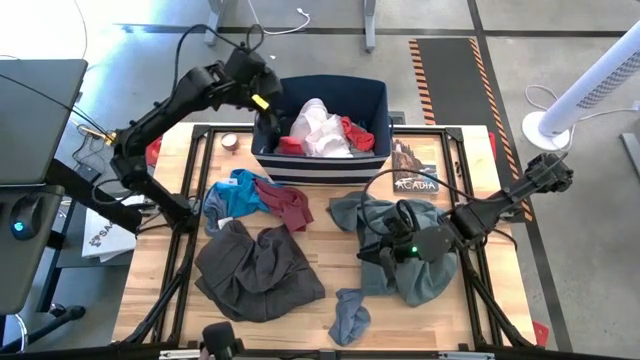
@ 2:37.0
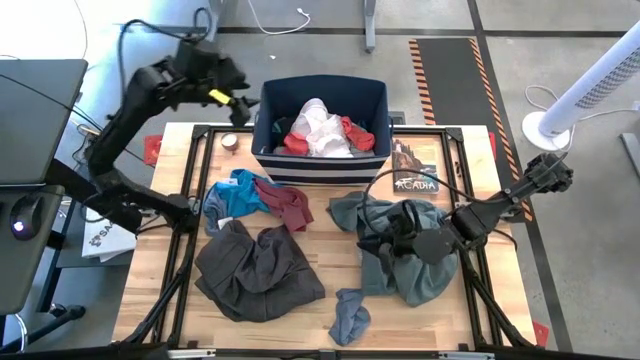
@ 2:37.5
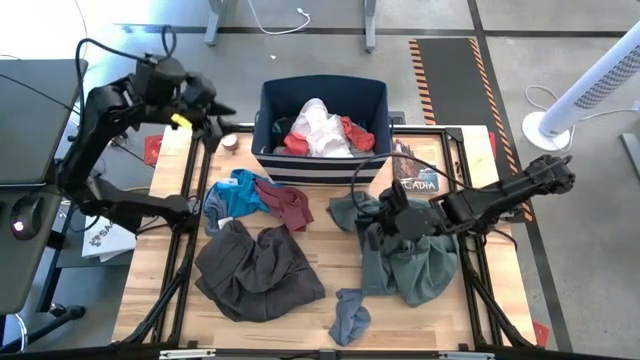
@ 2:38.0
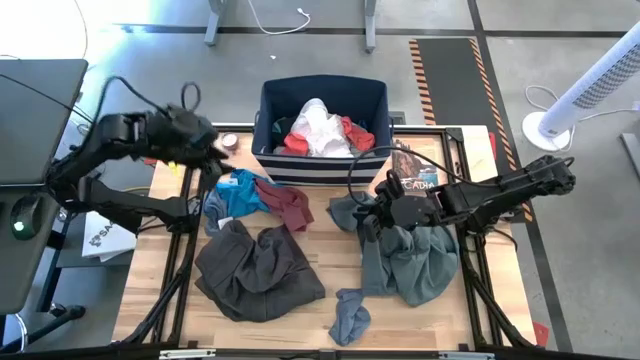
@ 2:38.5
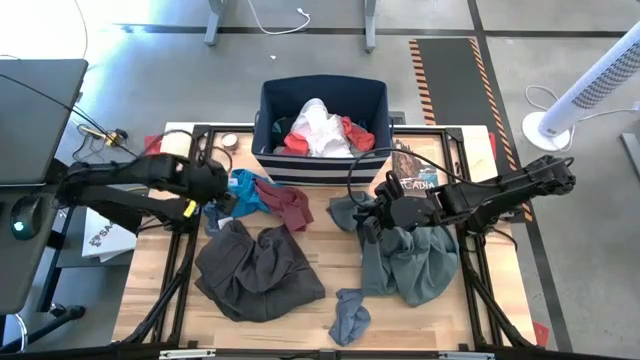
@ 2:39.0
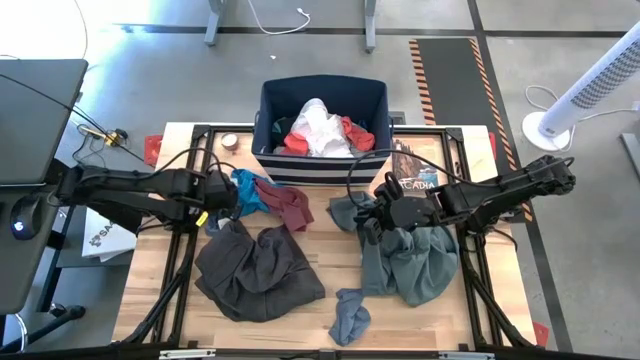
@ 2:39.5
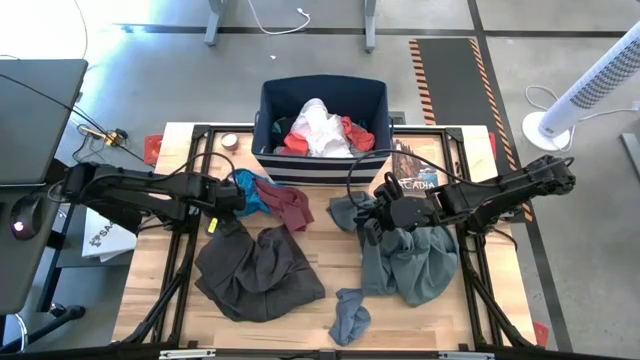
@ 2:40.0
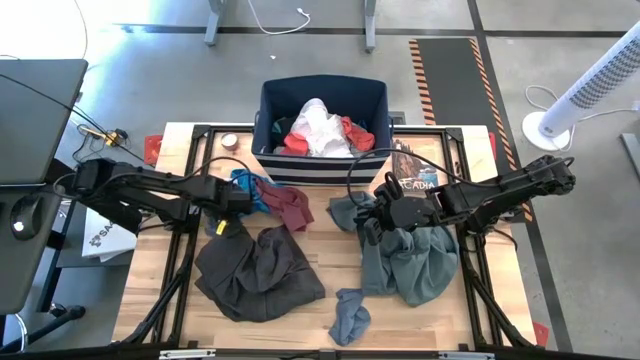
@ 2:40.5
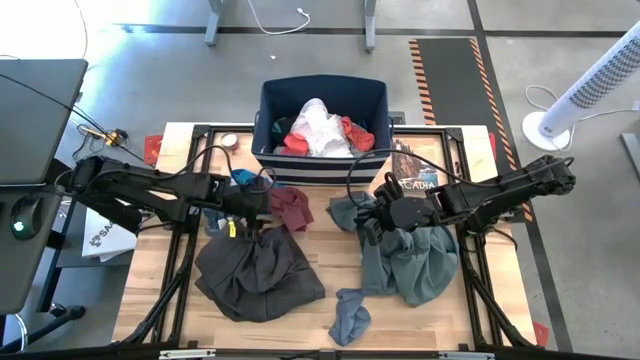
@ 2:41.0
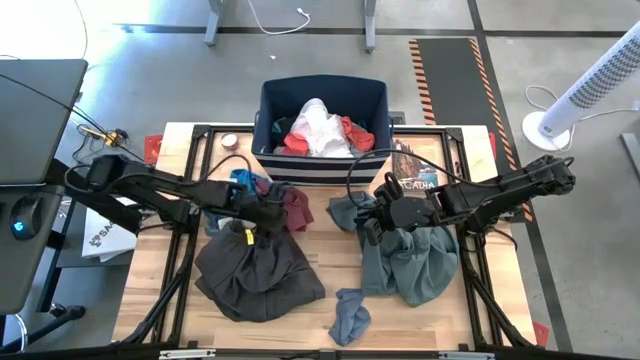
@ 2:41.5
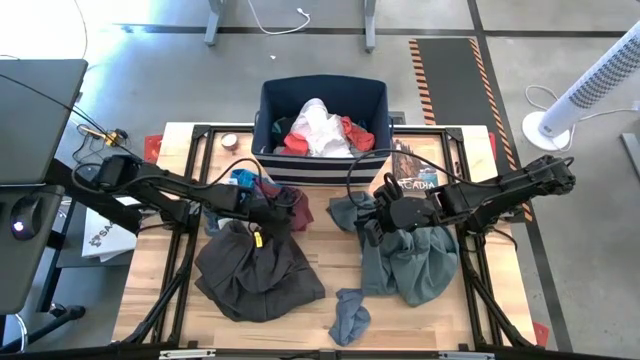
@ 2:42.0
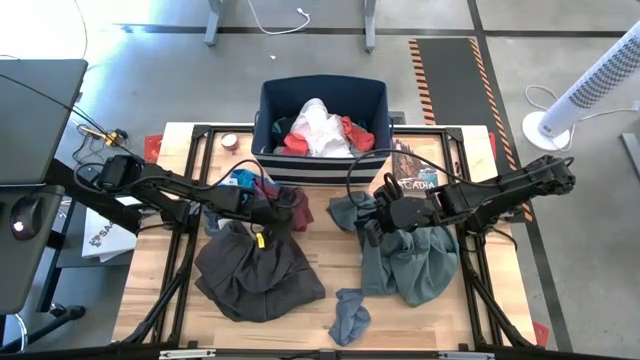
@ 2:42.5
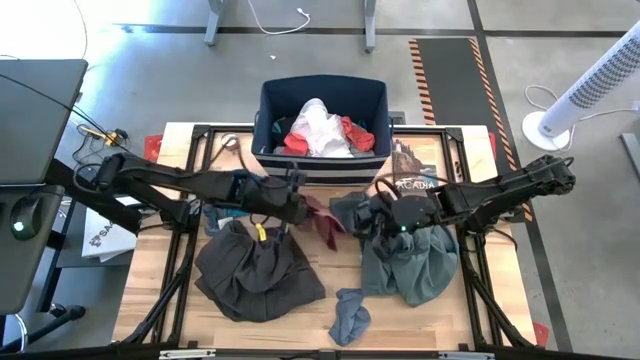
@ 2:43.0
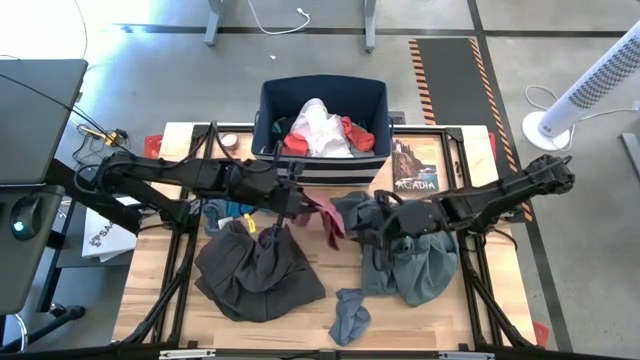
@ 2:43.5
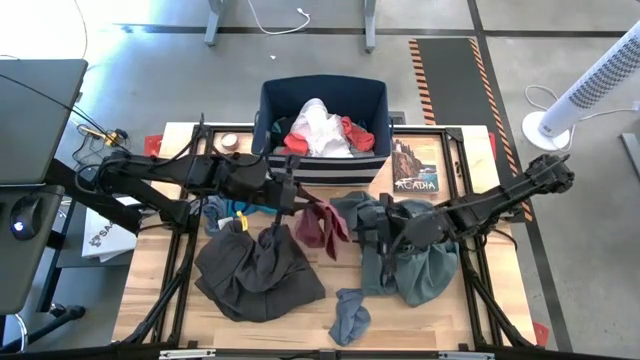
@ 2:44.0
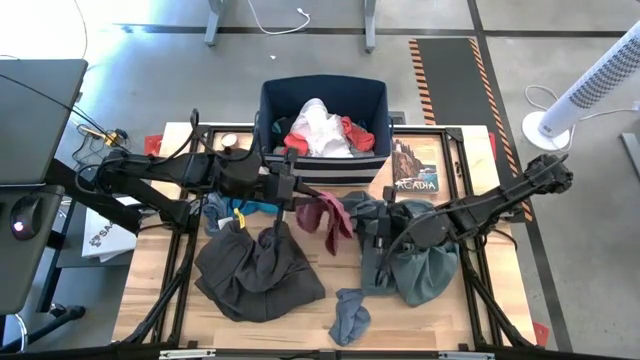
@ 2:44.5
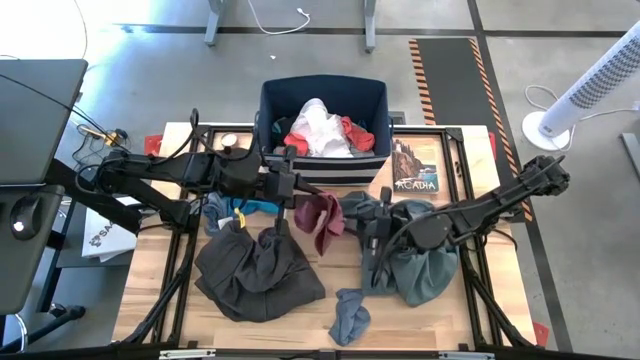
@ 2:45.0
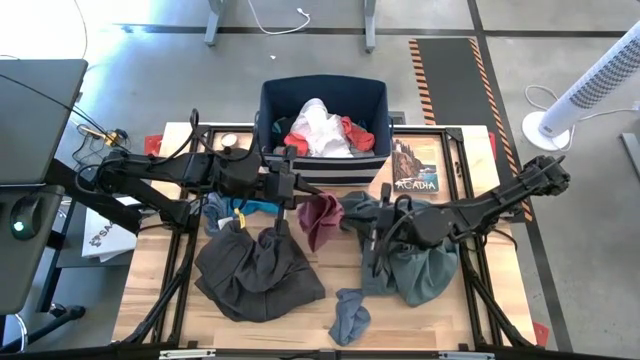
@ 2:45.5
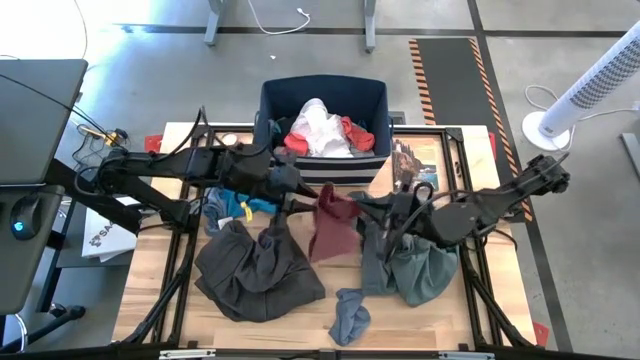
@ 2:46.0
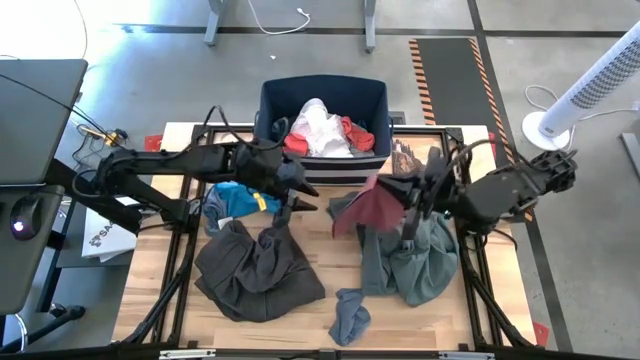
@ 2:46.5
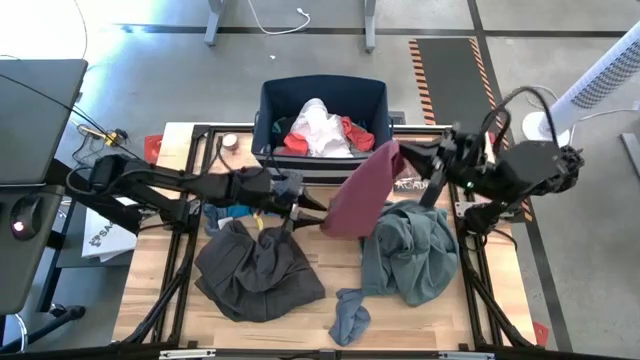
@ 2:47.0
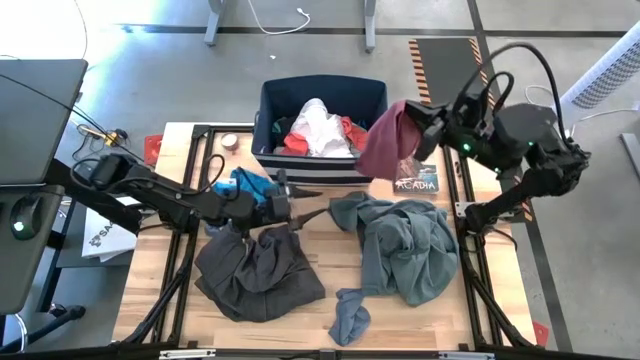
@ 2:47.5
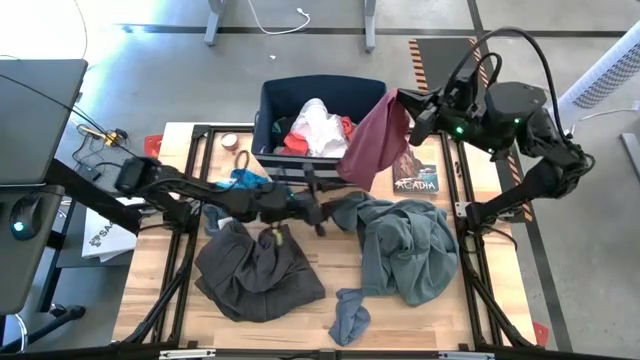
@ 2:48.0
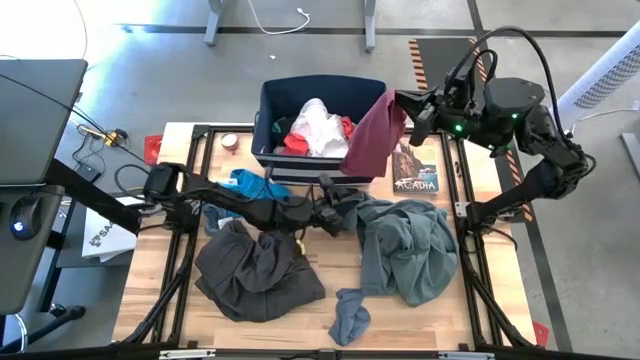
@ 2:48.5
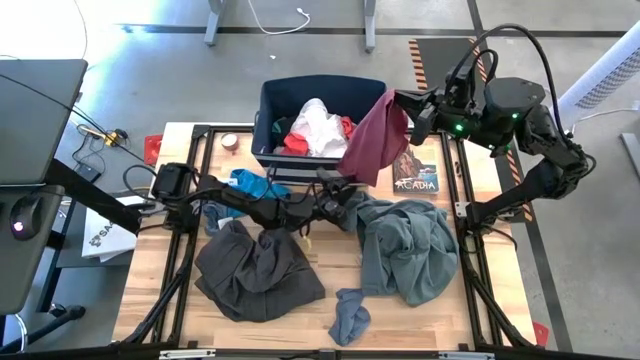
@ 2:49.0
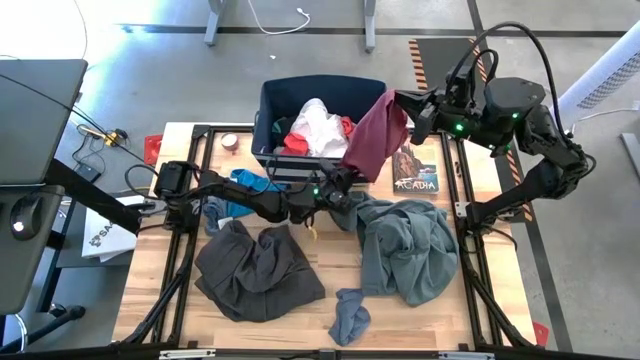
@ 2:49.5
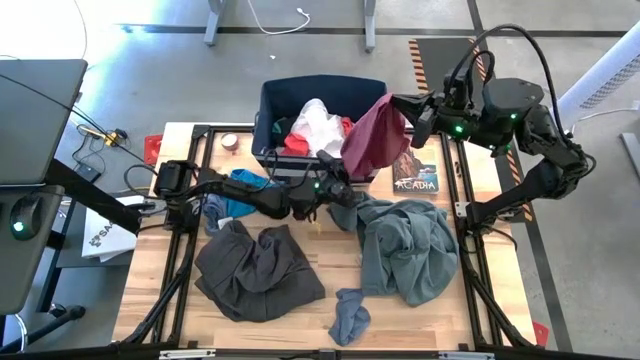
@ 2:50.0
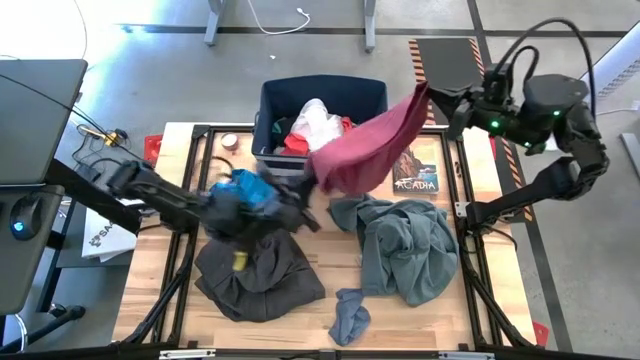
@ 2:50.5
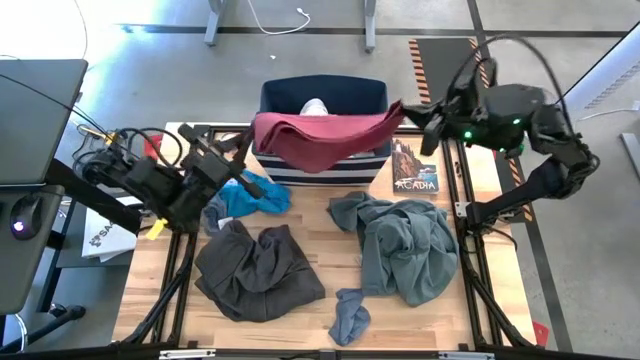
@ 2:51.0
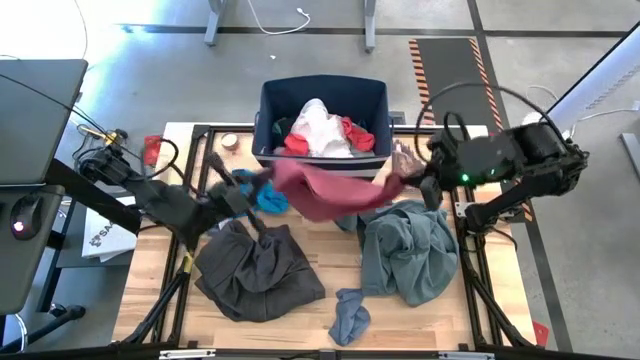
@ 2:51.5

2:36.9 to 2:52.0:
Task: Sort clothes
Put the pink skirt into the blue laundry bin

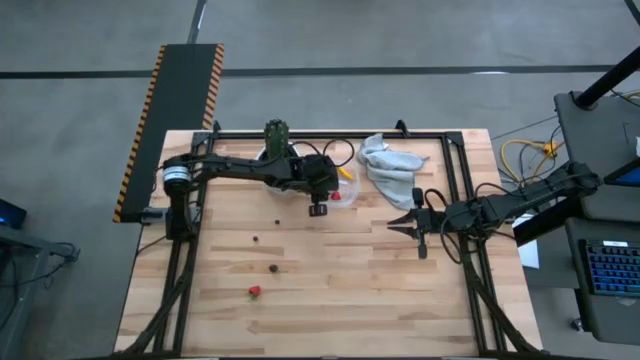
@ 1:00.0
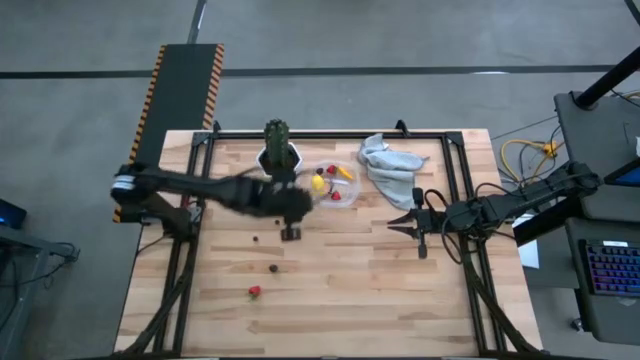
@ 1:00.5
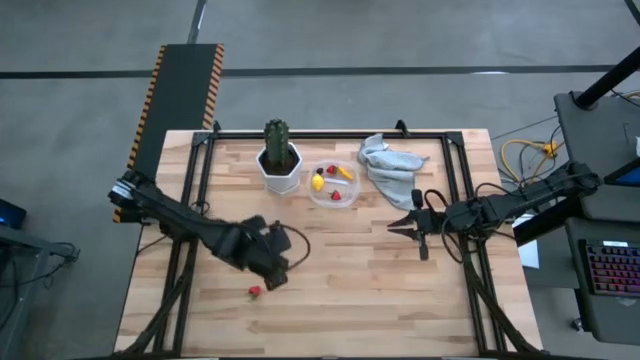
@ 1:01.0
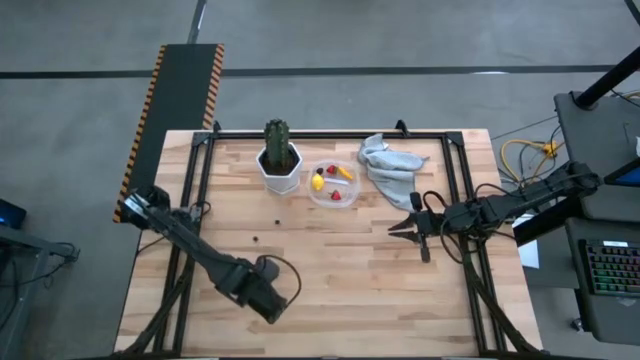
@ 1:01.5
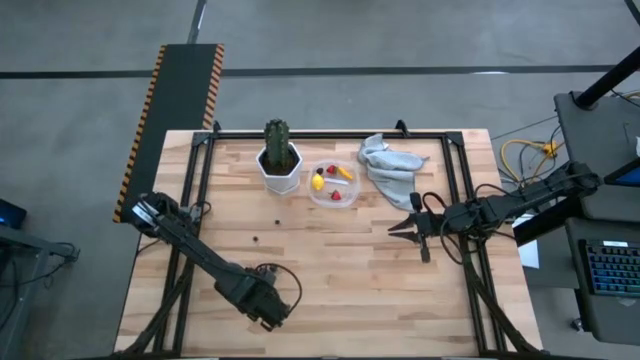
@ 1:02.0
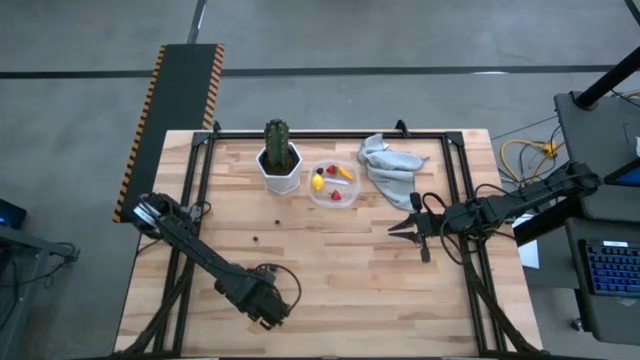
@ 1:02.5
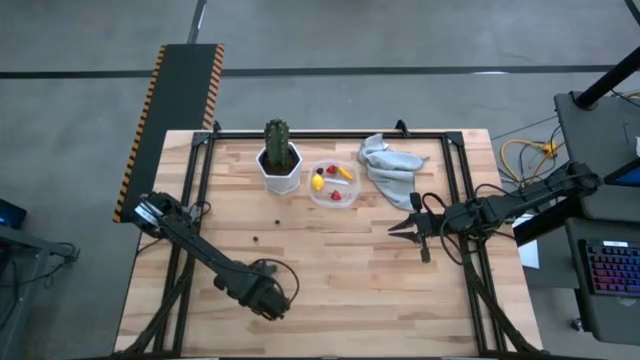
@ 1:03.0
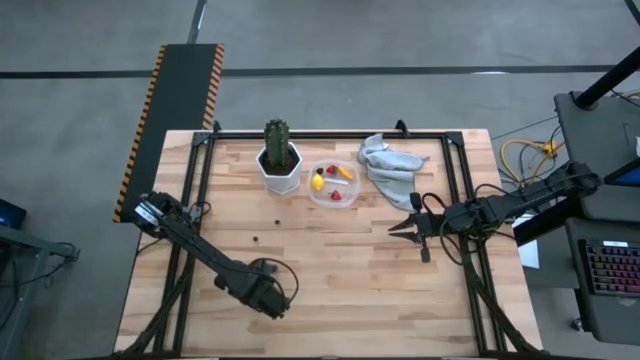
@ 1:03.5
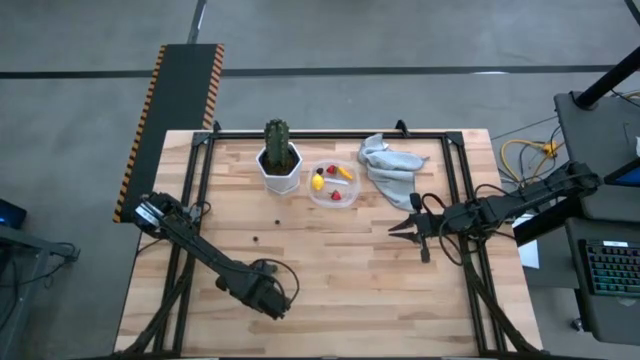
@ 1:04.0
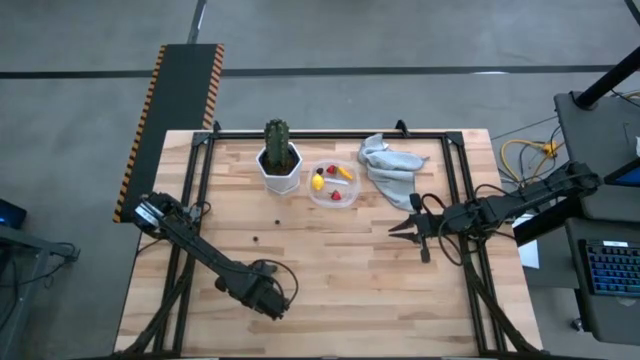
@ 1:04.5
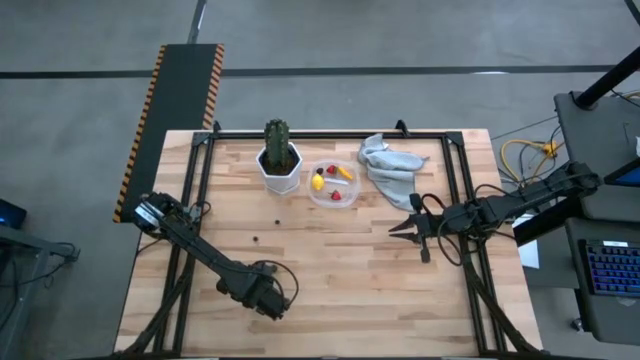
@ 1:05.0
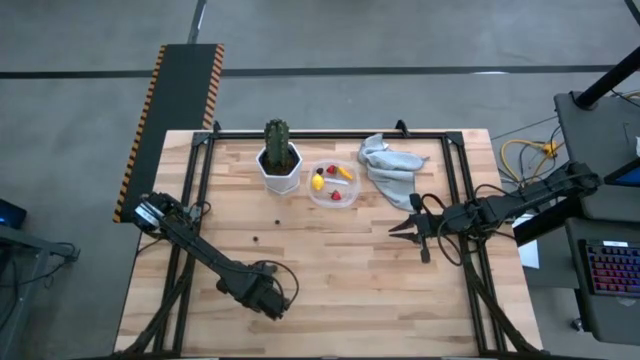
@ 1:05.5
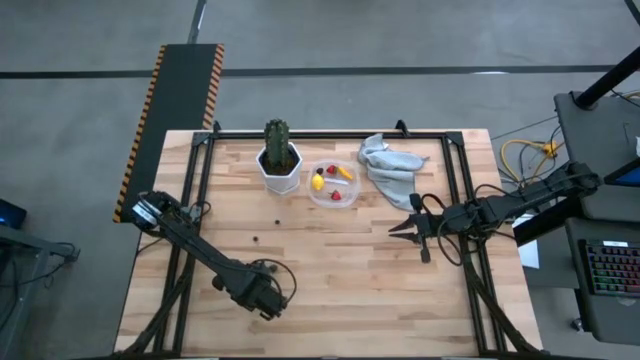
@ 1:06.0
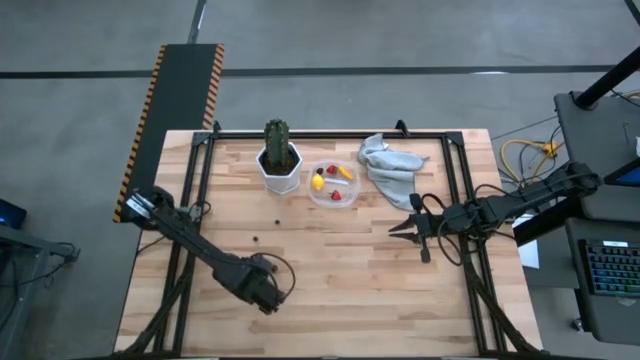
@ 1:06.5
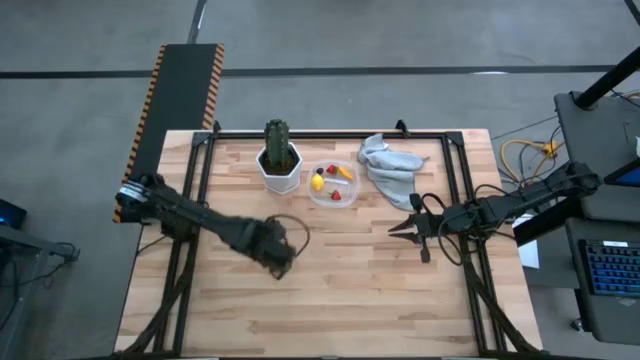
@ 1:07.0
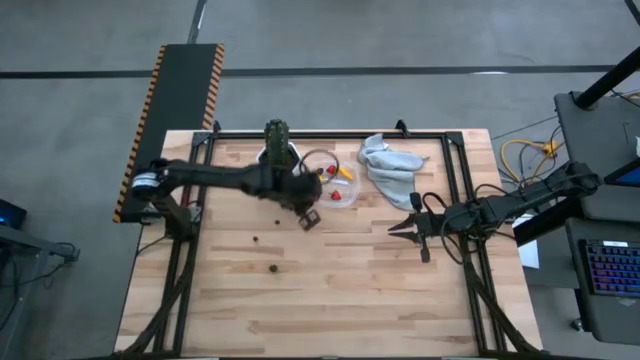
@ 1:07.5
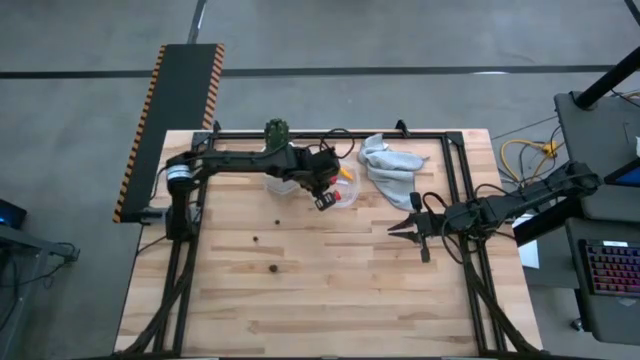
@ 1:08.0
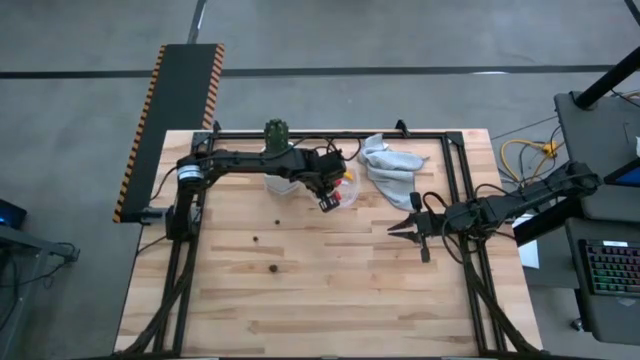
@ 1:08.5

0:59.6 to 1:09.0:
Task: Pick and placing Produce into tupperware
Put the red strawberry into the transparent bin
